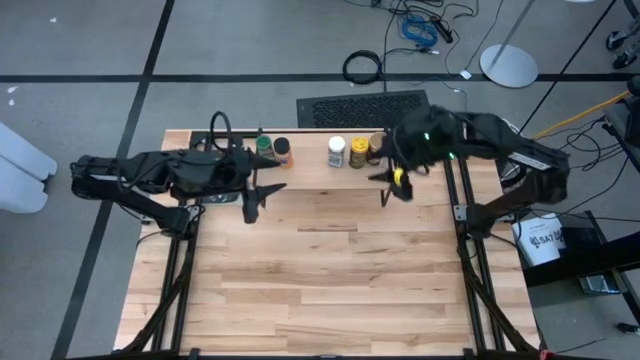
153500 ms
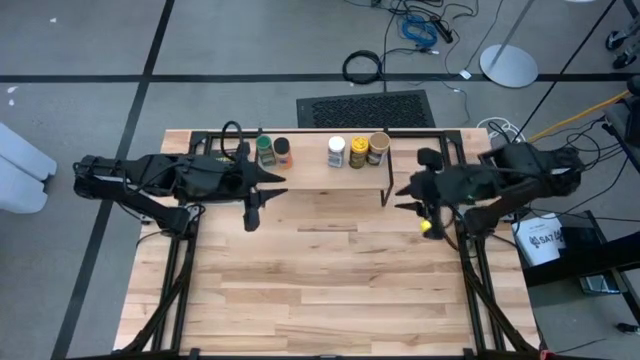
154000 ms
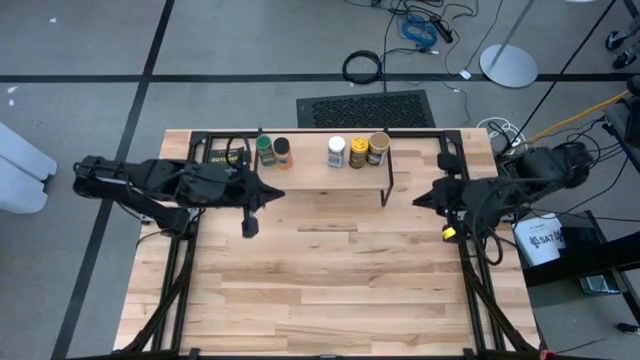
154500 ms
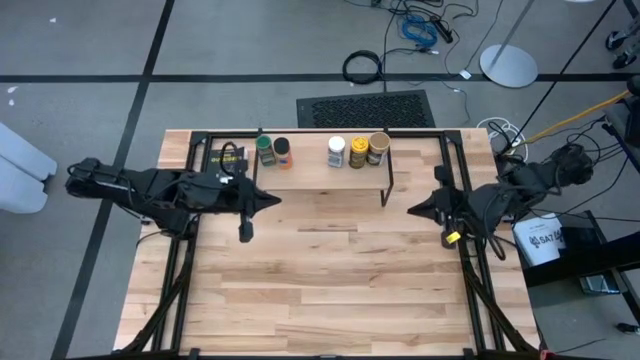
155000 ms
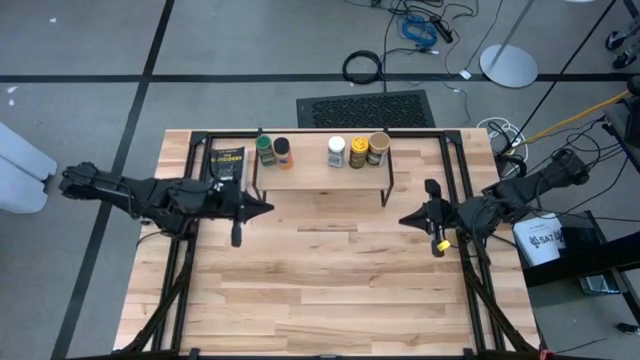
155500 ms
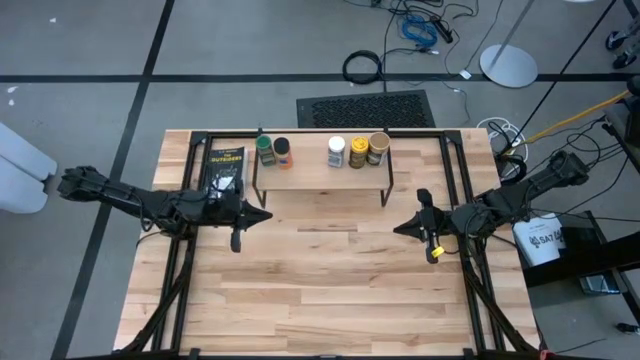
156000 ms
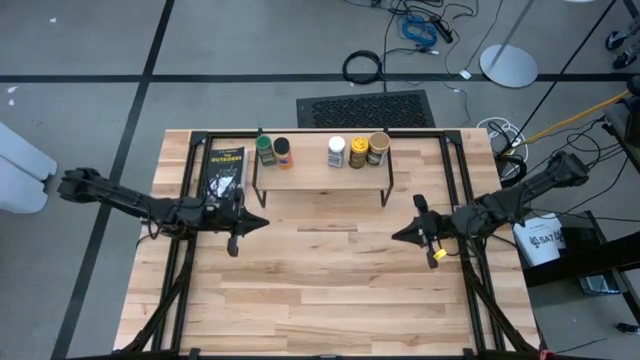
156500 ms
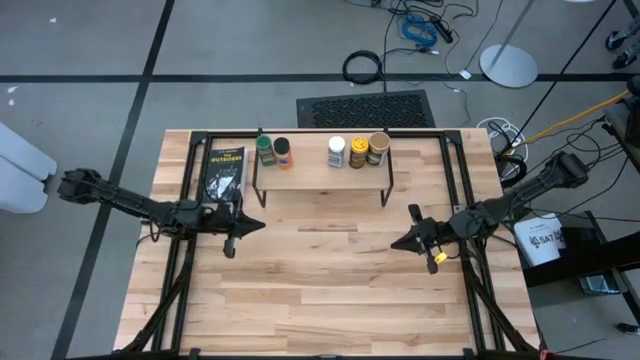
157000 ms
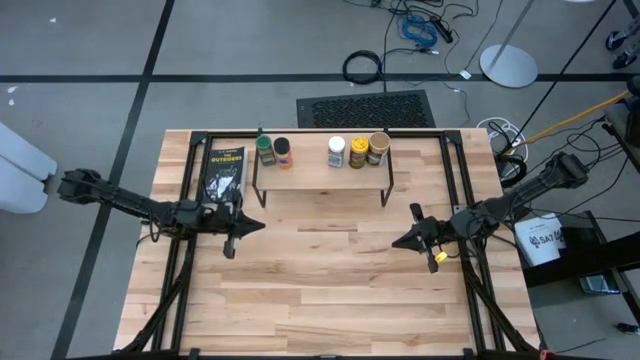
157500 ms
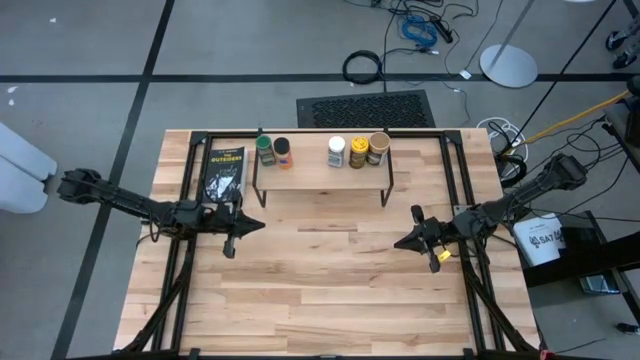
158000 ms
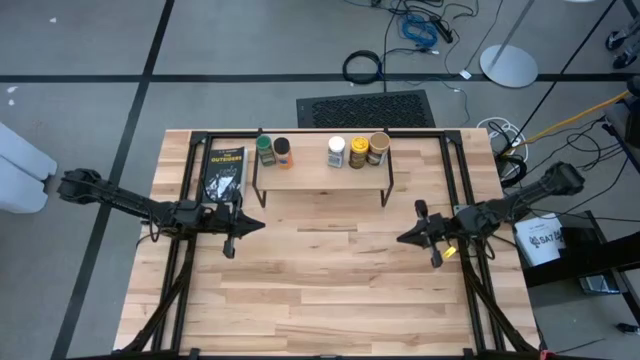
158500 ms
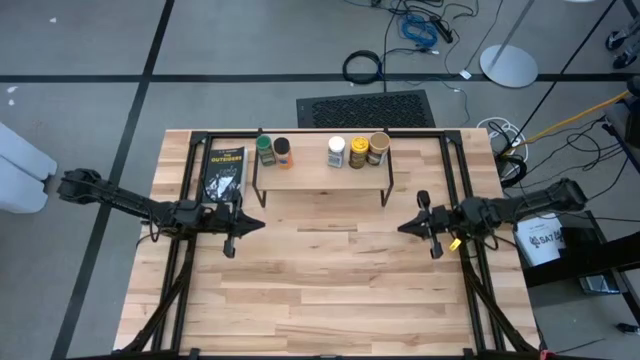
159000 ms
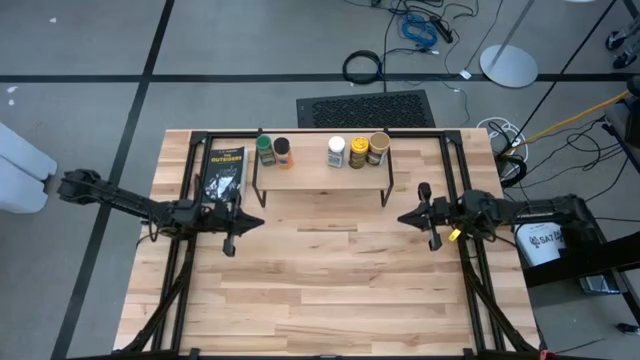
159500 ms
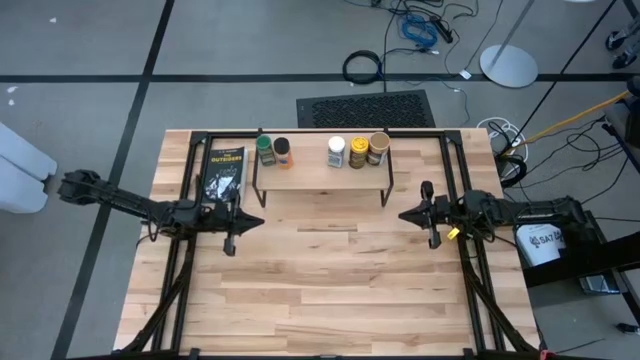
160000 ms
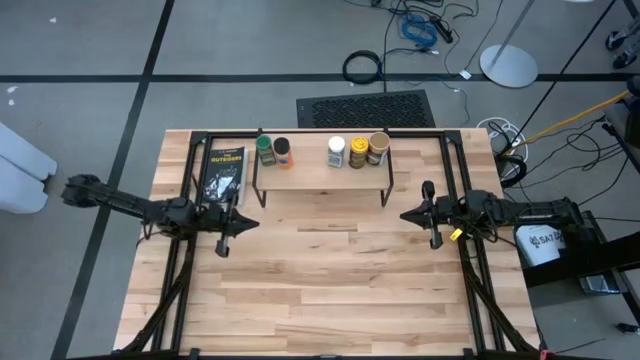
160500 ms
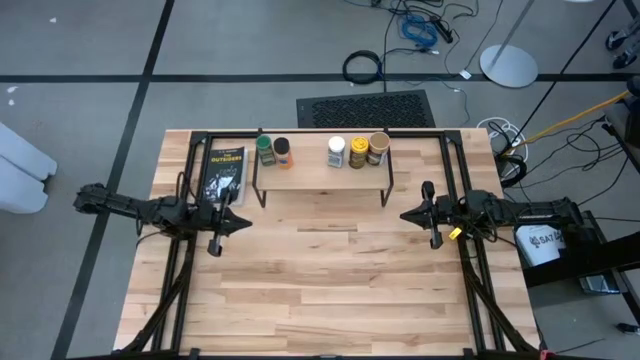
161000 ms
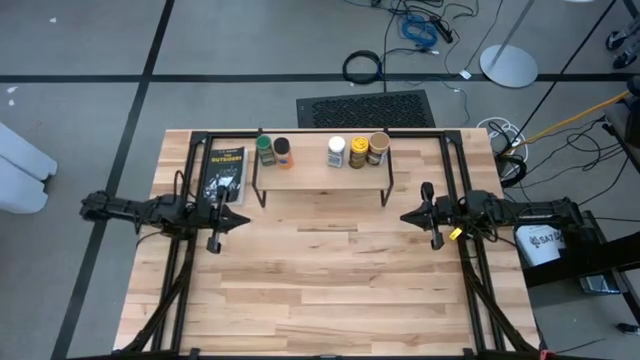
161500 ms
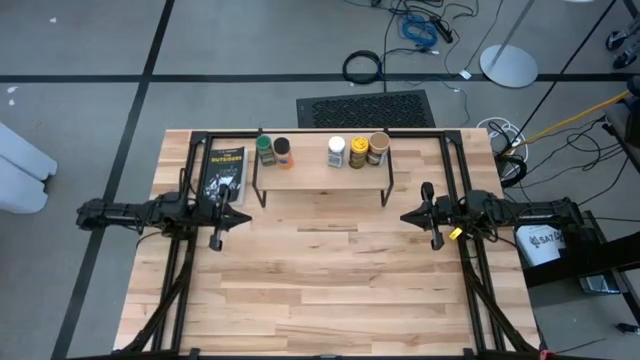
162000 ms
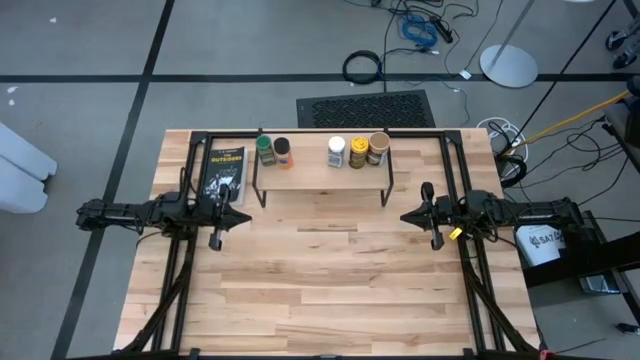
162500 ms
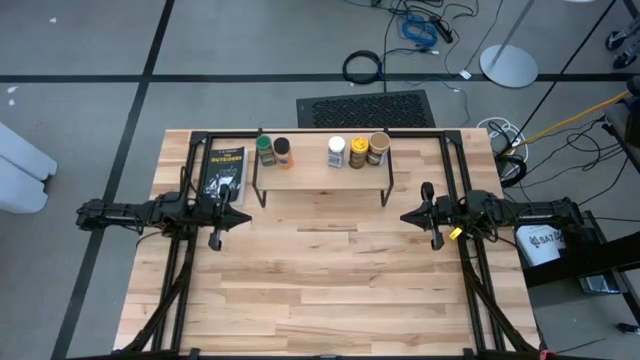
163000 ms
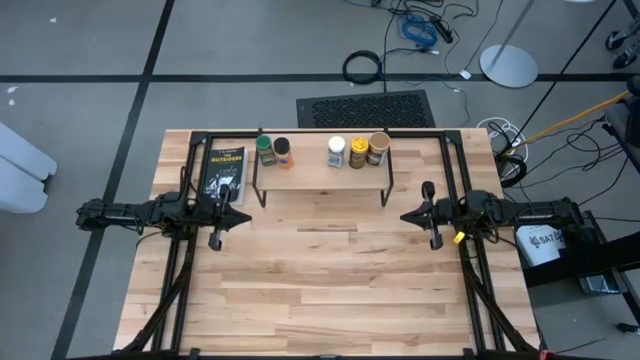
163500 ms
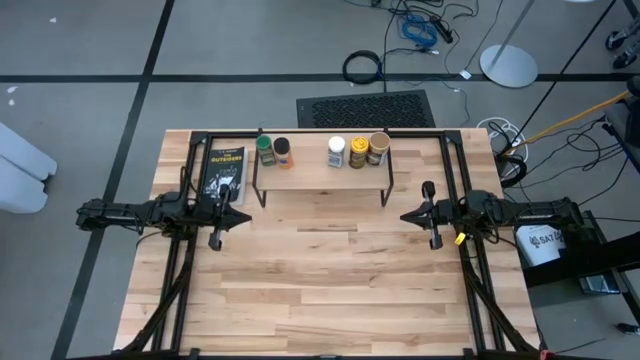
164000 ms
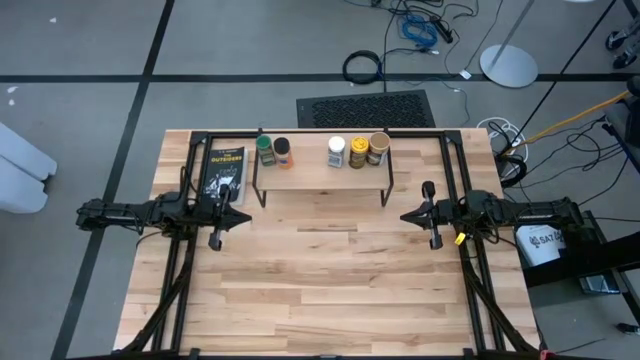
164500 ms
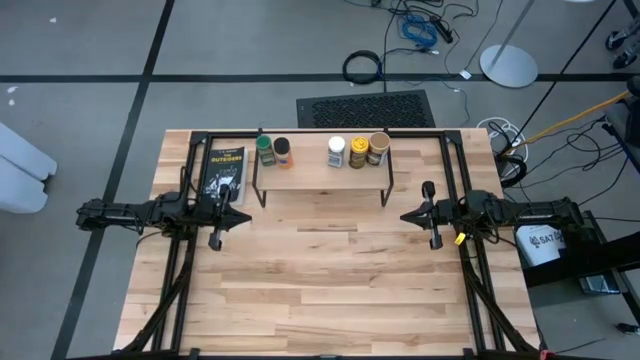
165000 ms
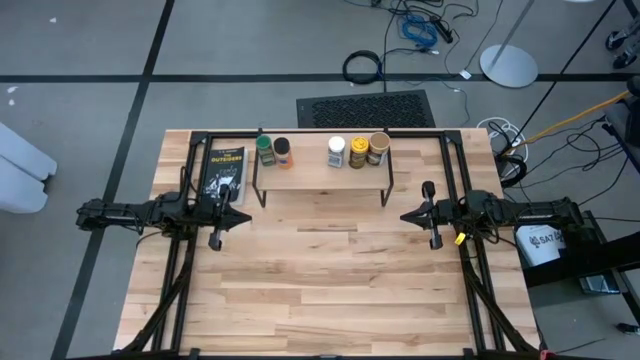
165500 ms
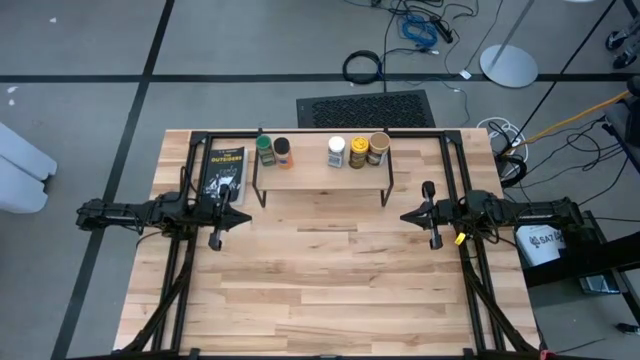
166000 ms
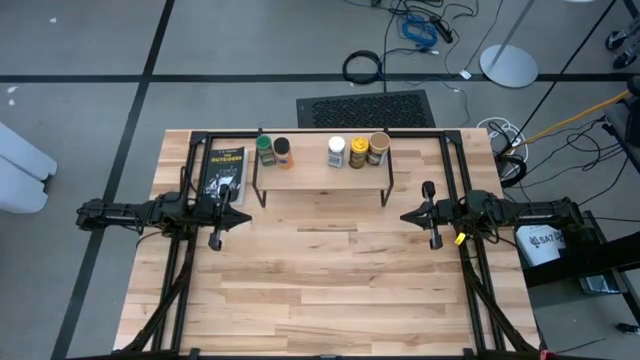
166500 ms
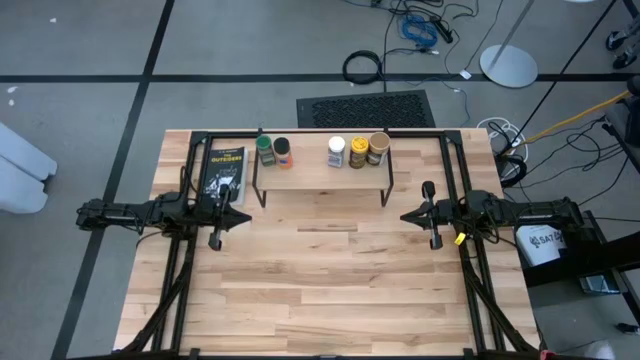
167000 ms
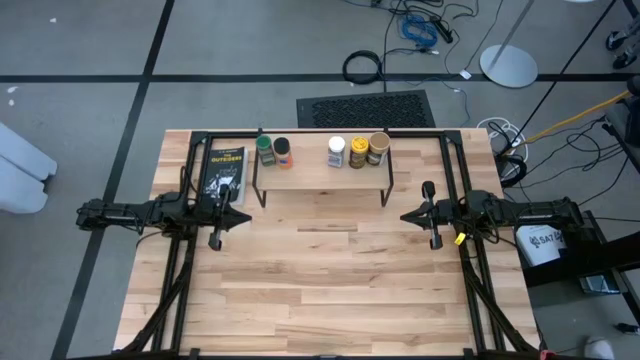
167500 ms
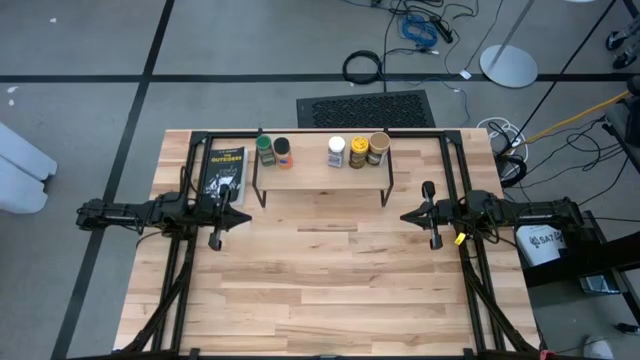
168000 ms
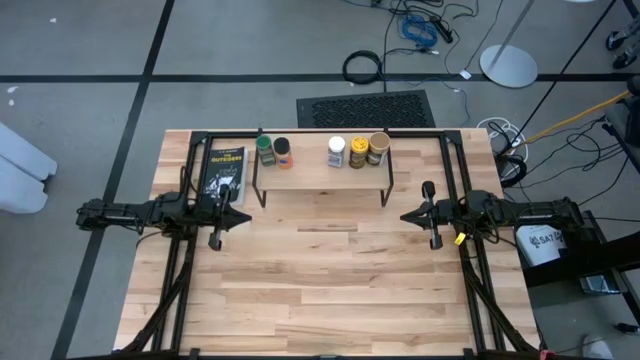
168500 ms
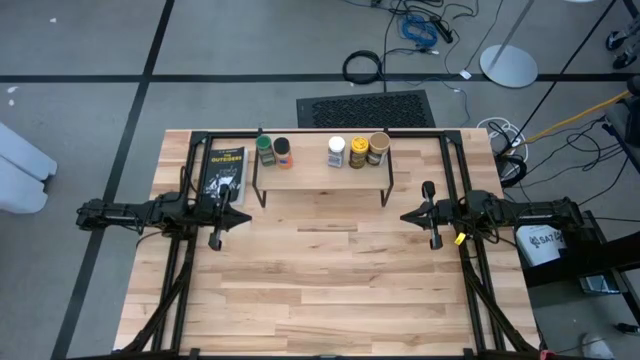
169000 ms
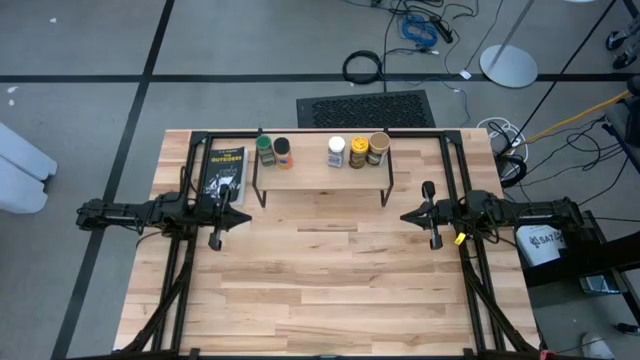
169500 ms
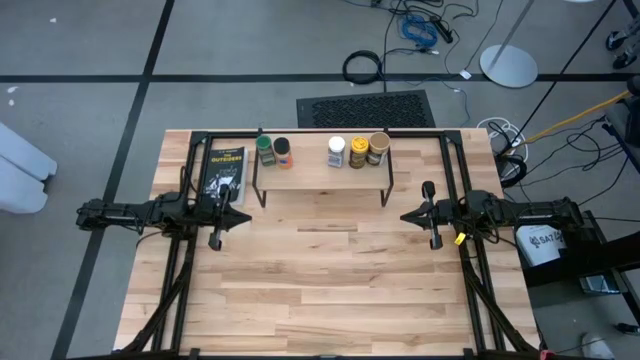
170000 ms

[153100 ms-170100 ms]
Task: Shelf spices
Return to Home Position
